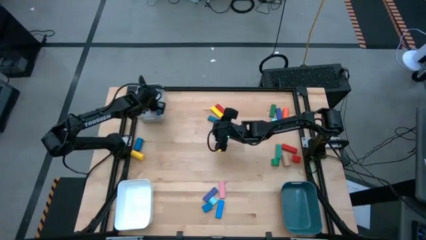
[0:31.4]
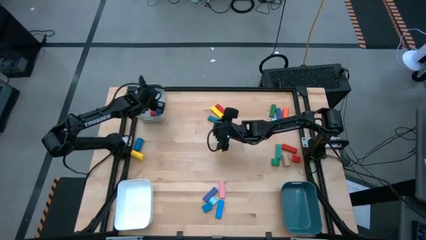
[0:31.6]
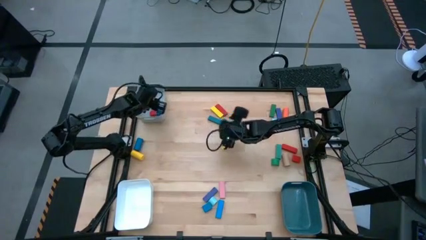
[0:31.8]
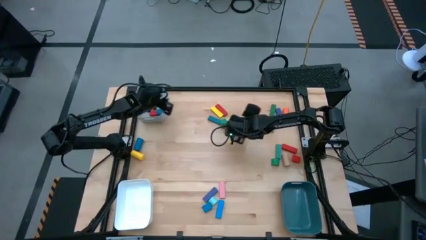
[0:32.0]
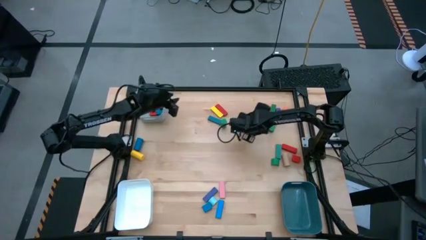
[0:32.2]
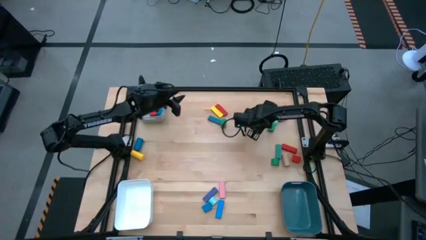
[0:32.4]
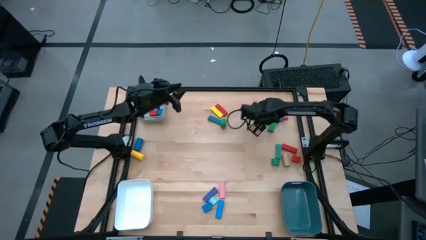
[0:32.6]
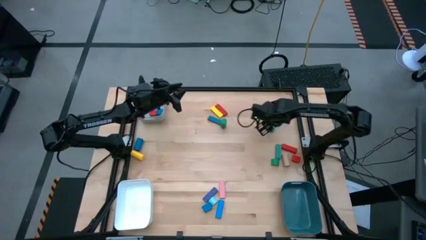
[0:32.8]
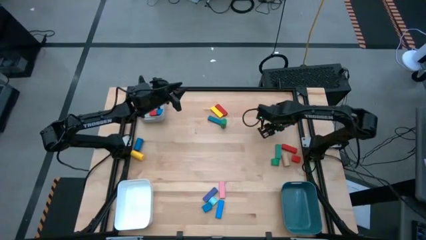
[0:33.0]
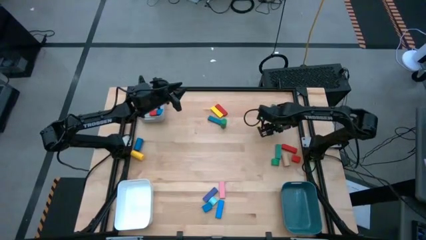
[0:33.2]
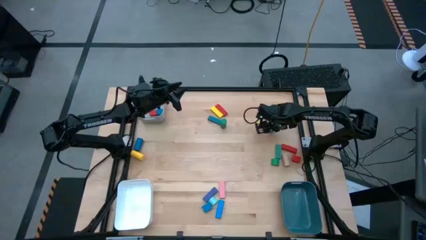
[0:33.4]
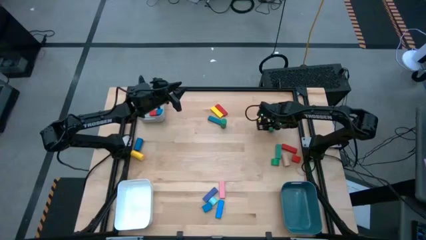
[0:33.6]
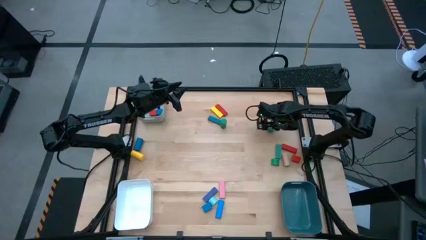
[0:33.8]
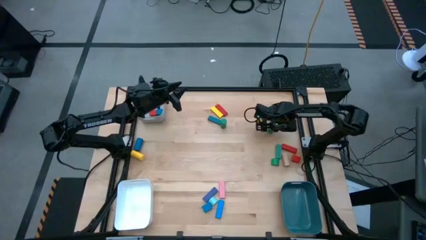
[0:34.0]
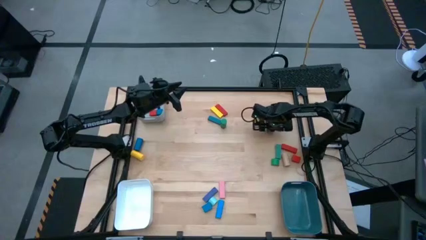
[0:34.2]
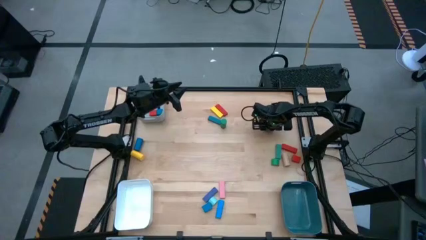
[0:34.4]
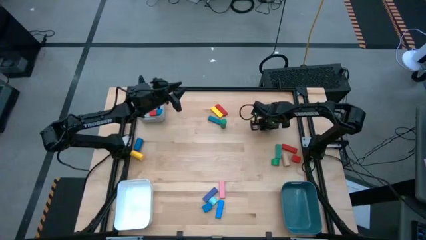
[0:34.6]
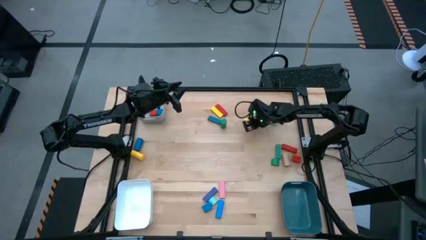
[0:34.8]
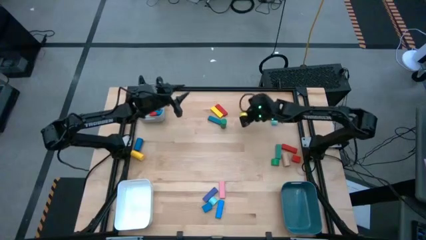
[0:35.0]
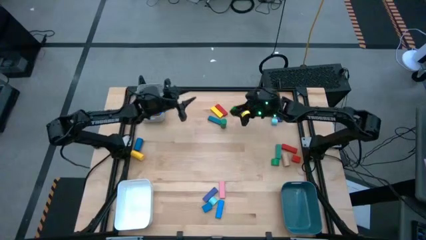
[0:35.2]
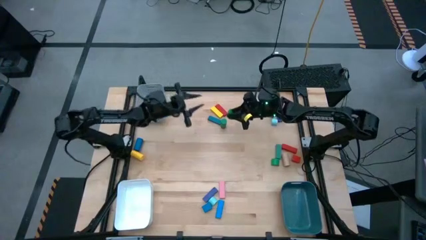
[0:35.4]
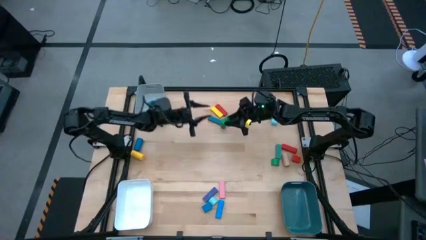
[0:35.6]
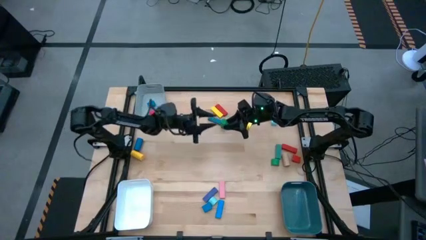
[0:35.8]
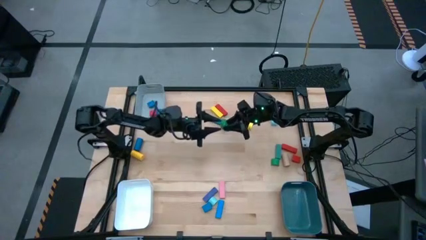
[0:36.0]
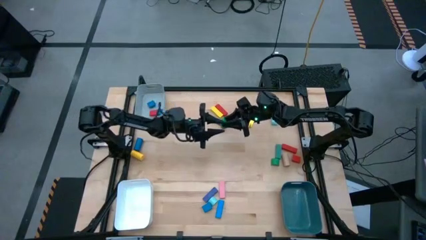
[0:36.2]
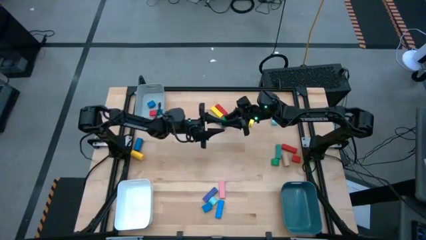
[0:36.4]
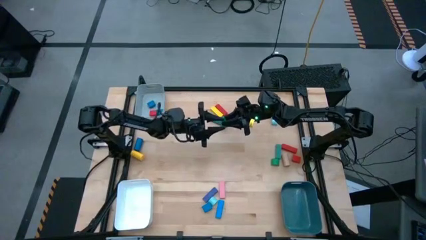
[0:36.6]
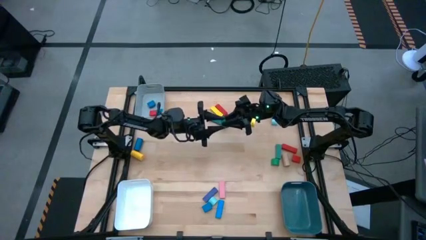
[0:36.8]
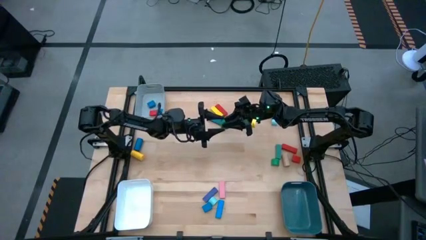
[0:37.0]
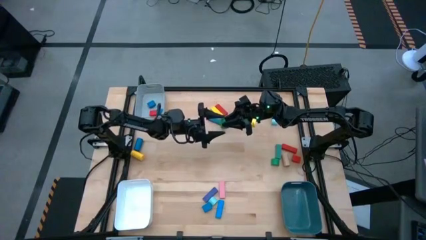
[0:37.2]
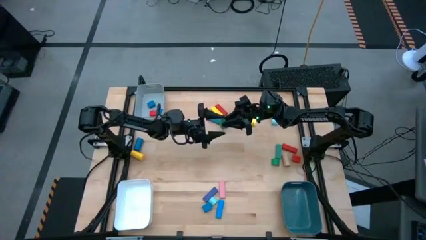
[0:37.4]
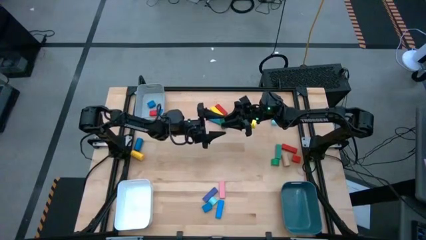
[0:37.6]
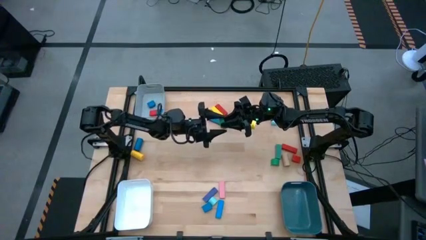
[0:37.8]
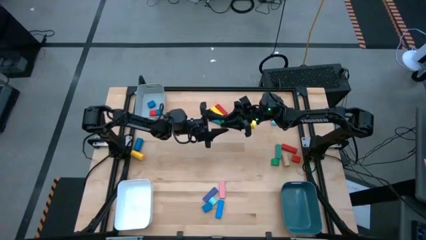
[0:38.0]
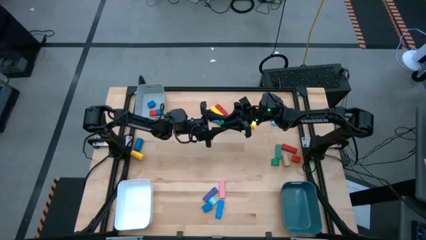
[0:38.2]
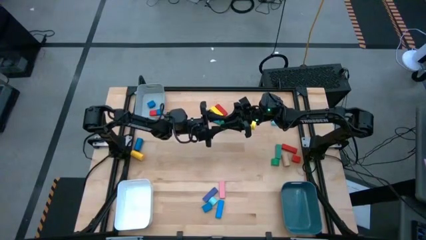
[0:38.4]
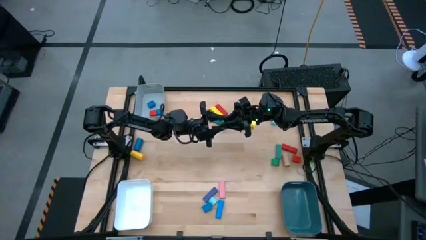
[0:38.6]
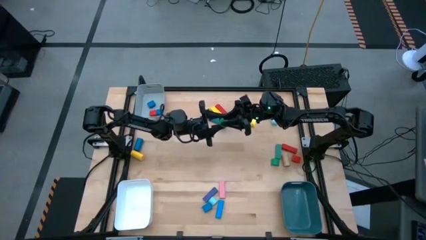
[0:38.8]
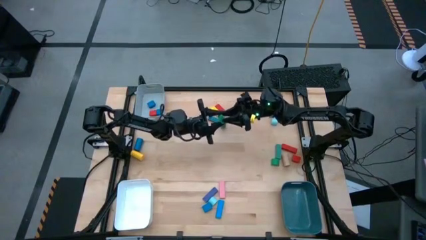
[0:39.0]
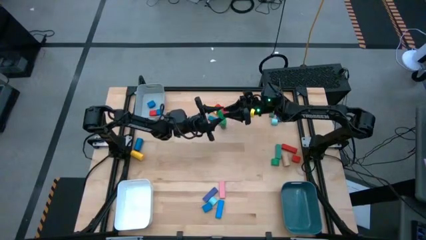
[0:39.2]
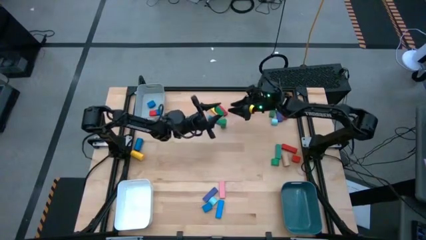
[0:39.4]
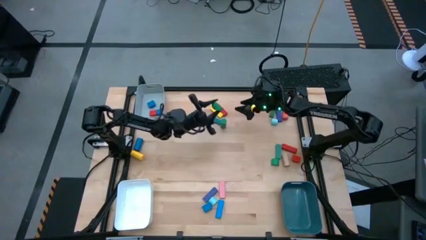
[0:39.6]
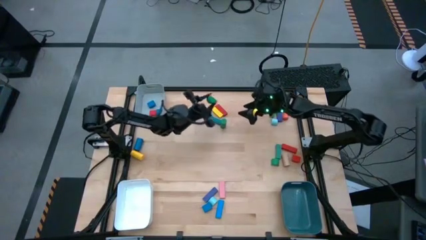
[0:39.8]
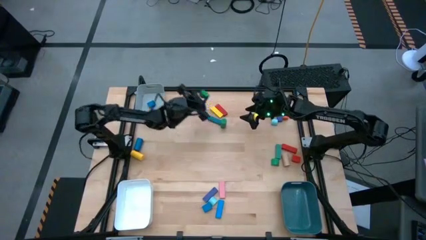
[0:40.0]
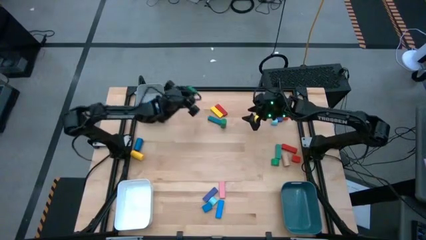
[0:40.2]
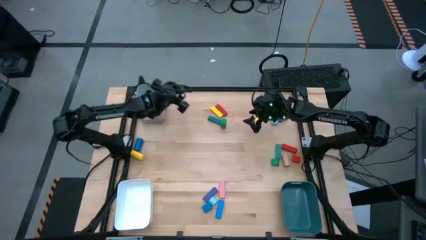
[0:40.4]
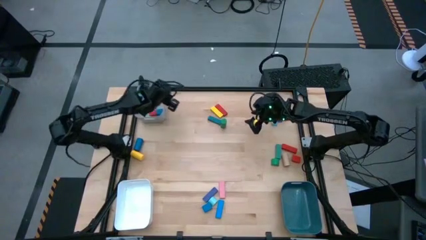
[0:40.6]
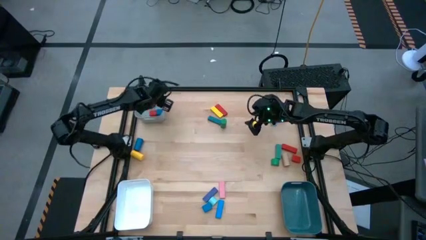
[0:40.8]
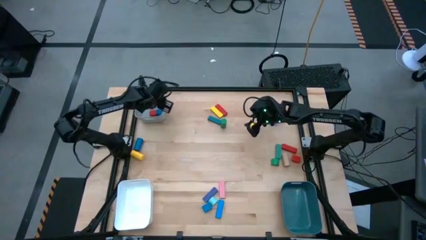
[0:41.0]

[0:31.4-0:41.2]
Task: Sort blocks by size
Put the green half-circle block into the gray bin

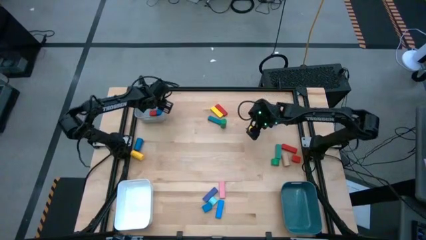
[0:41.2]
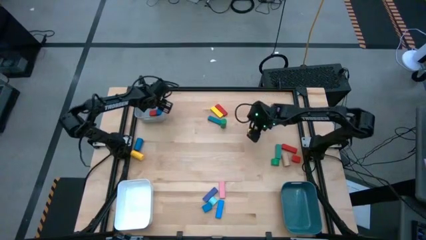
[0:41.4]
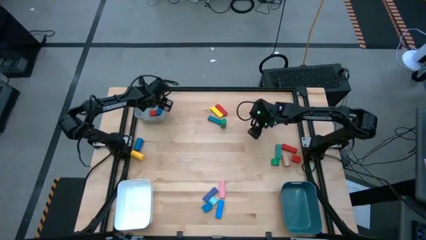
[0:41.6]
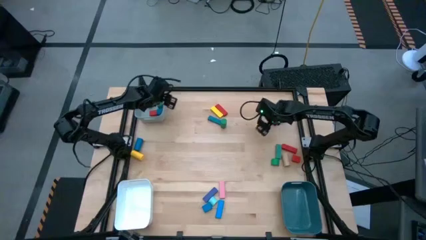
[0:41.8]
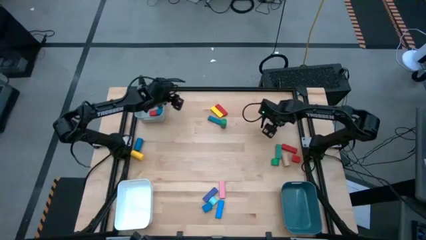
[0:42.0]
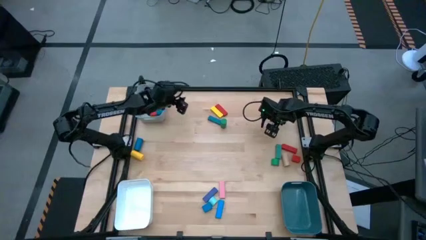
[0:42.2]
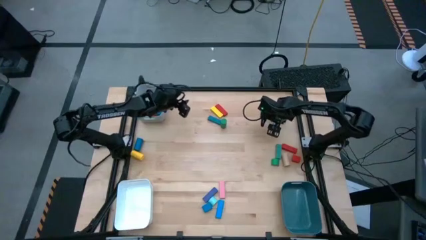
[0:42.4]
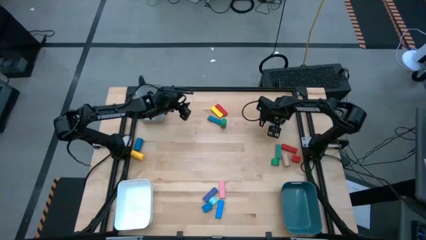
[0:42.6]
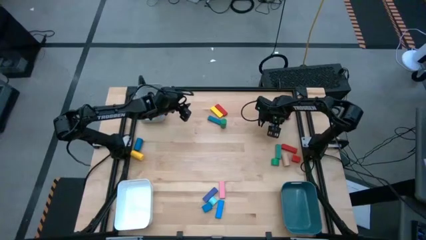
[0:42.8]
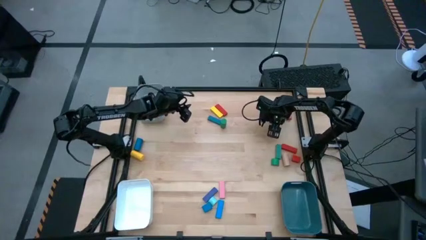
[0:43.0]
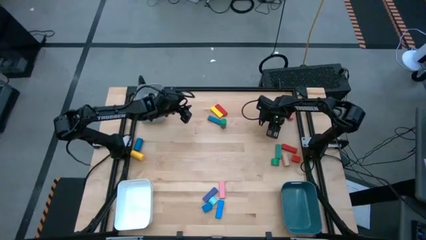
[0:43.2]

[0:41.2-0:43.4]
Put the light blue half-circle block into the gray bin

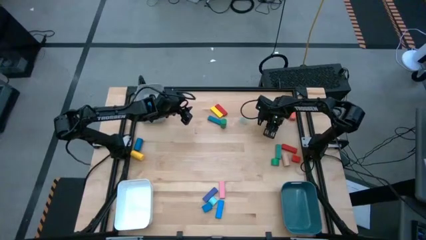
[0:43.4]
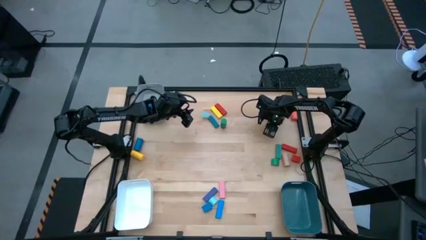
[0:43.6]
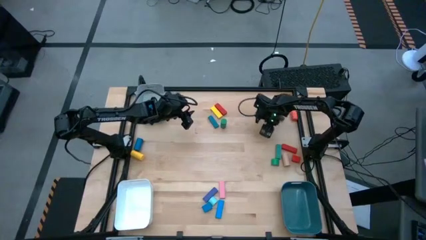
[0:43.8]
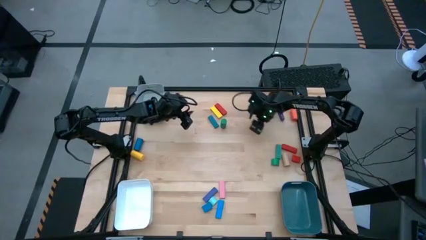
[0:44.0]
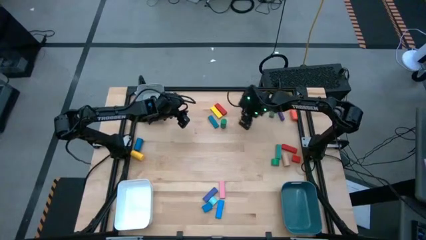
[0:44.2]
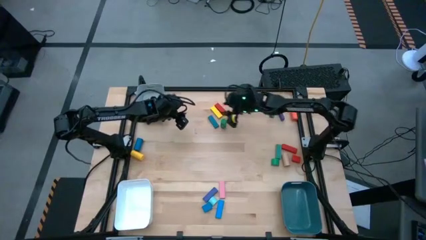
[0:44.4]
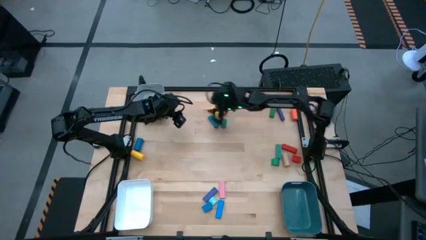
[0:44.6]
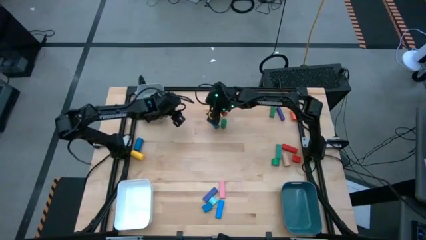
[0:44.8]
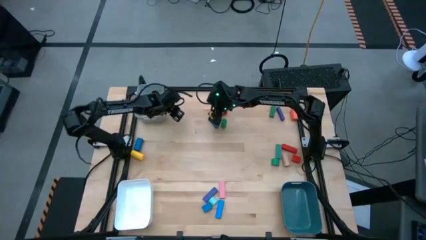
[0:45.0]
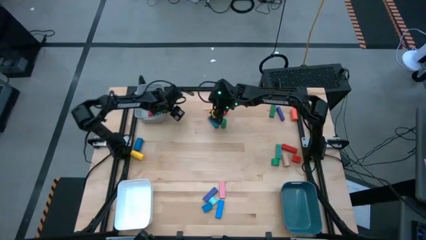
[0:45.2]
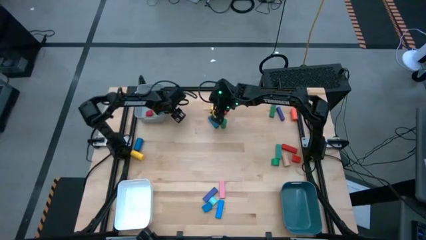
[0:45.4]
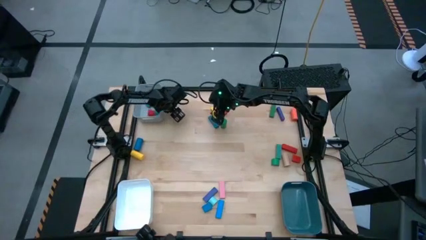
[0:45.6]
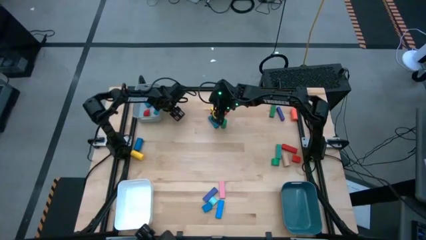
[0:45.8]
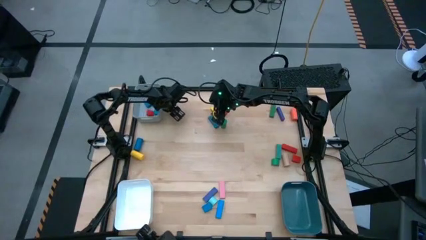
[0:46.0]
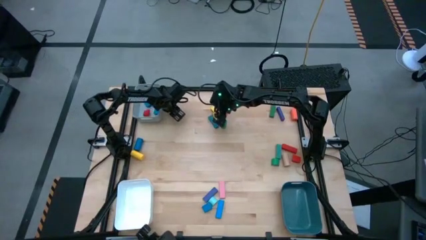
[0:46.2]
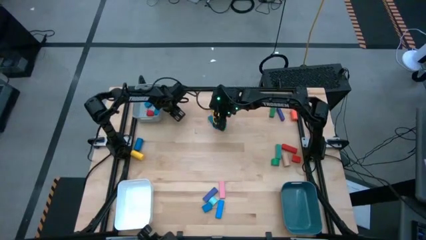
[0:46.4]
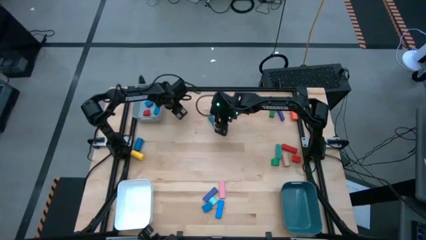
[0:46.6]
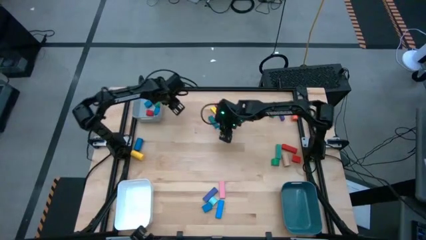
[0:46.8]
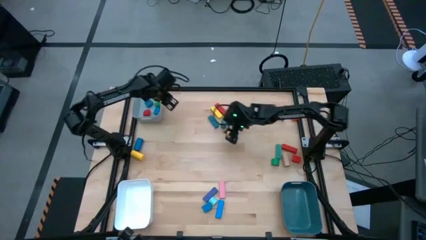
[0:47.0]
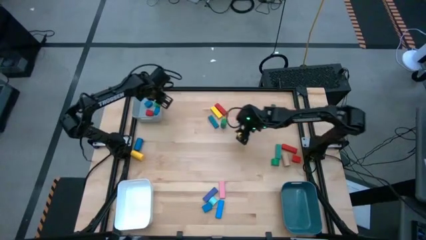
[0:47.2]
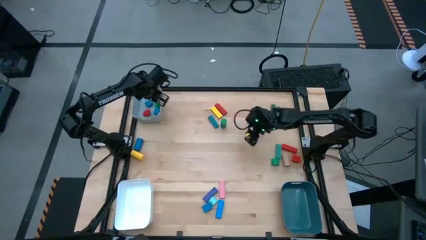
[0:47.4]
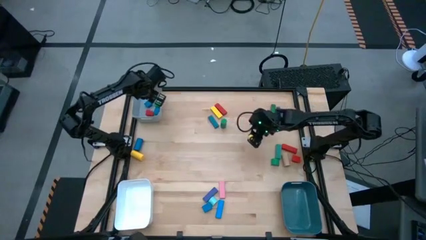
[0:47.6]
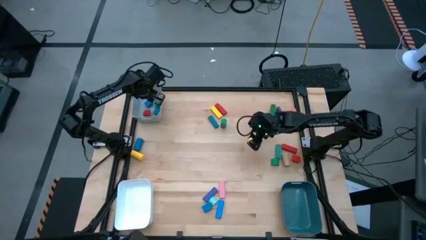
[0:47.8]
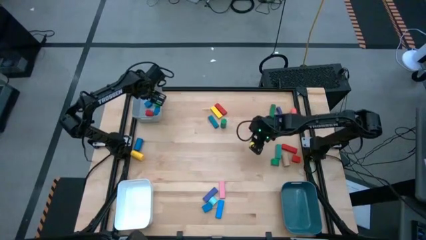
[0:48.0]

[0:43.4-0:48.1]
Put the light blue half-circle block into the gray bin
